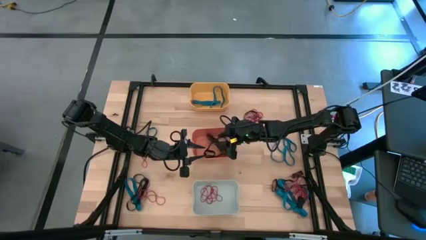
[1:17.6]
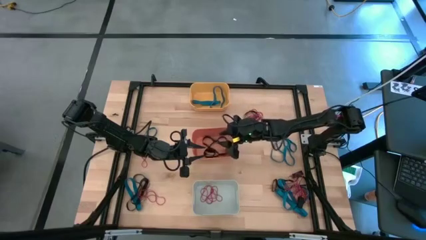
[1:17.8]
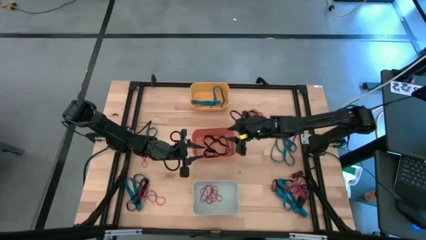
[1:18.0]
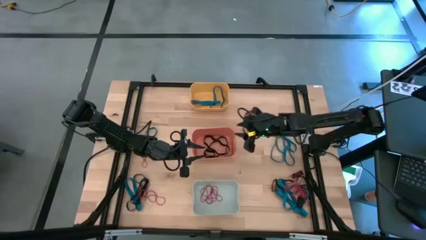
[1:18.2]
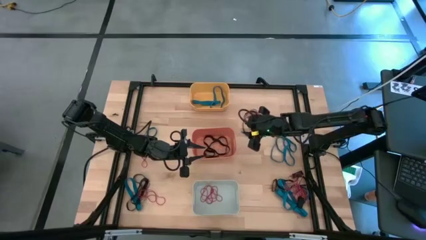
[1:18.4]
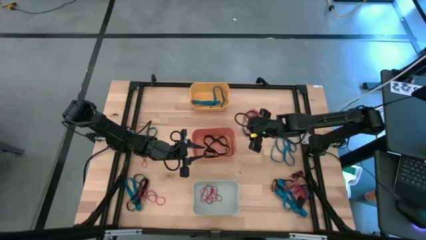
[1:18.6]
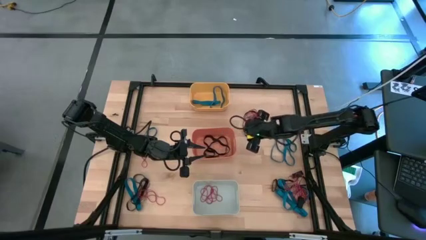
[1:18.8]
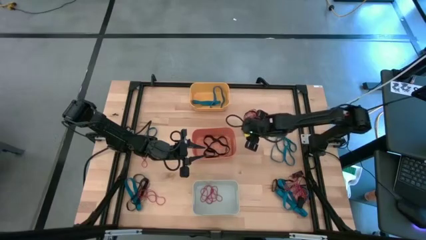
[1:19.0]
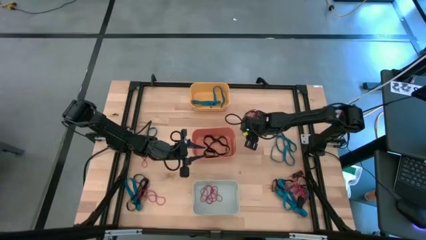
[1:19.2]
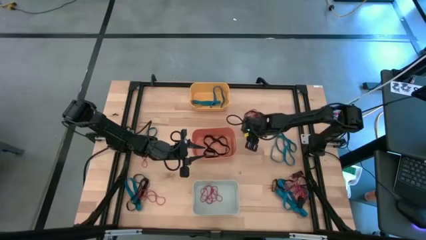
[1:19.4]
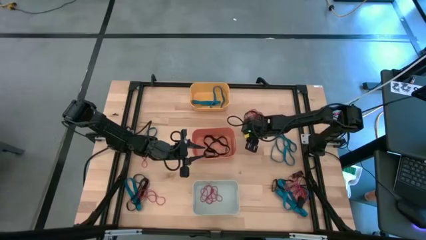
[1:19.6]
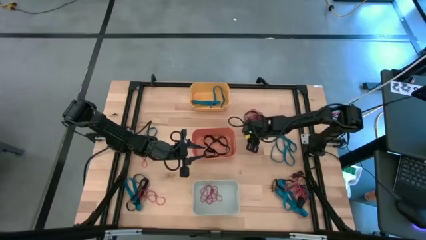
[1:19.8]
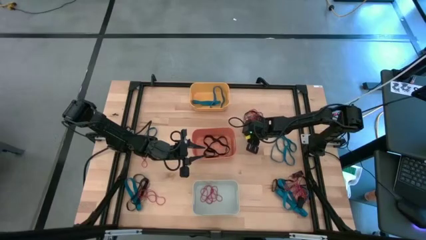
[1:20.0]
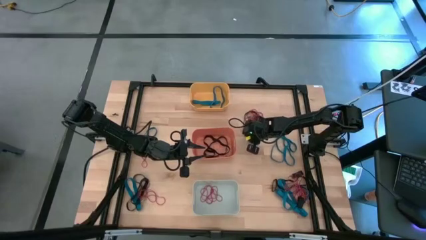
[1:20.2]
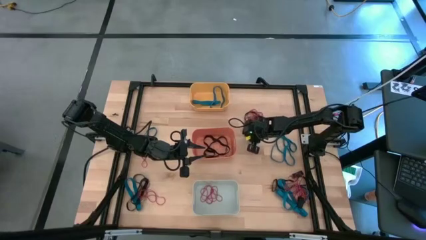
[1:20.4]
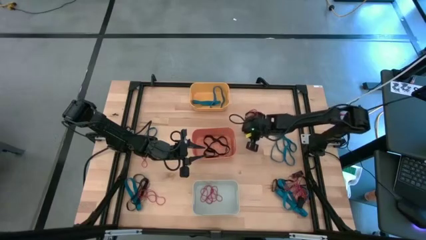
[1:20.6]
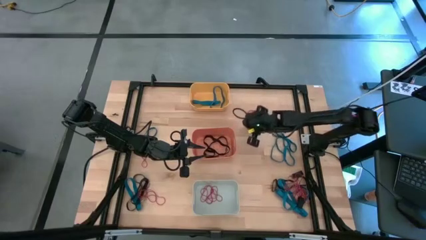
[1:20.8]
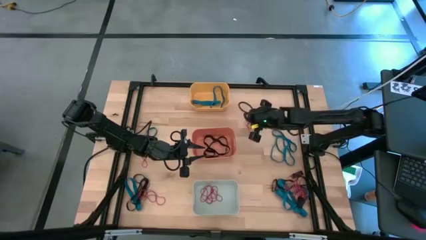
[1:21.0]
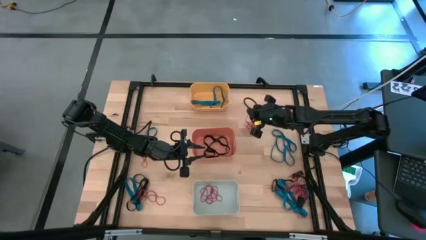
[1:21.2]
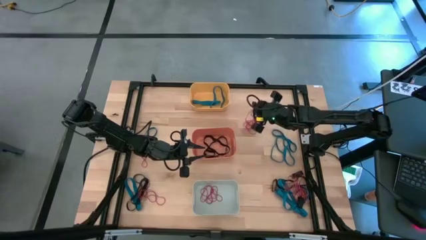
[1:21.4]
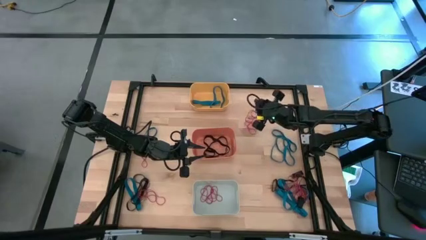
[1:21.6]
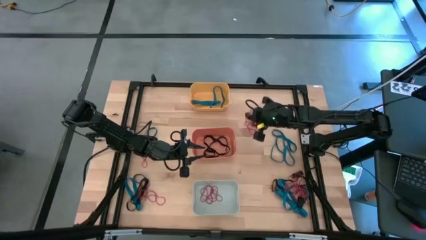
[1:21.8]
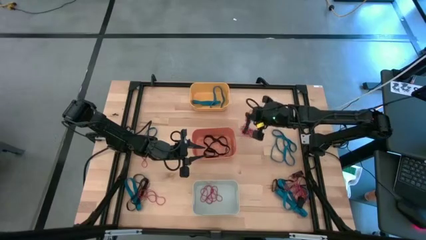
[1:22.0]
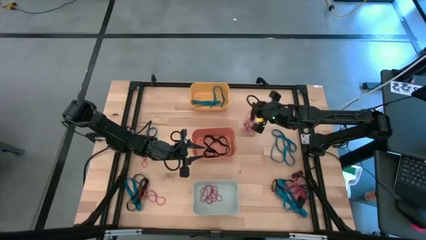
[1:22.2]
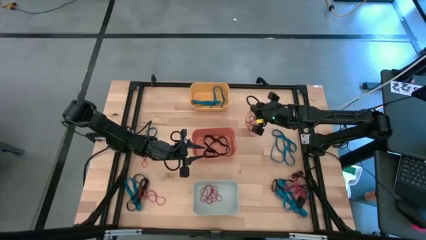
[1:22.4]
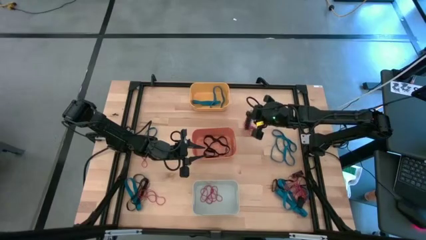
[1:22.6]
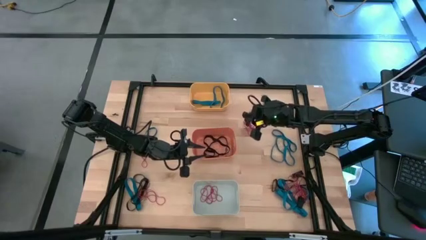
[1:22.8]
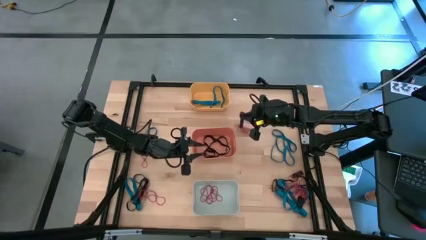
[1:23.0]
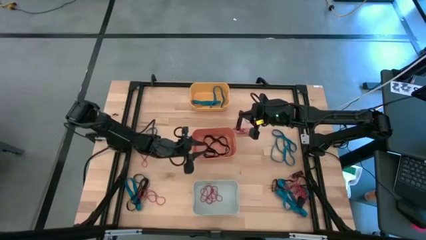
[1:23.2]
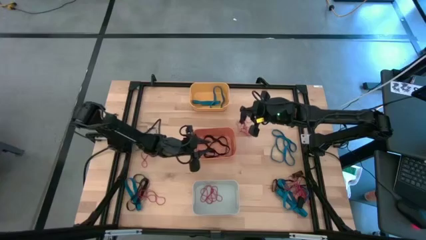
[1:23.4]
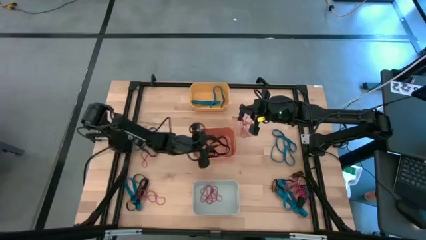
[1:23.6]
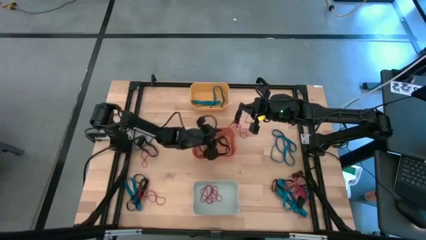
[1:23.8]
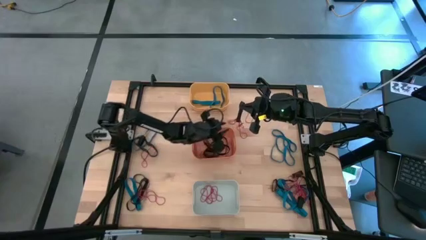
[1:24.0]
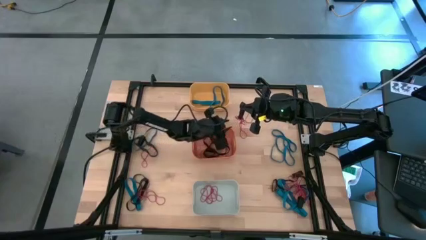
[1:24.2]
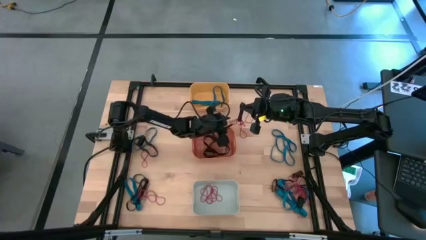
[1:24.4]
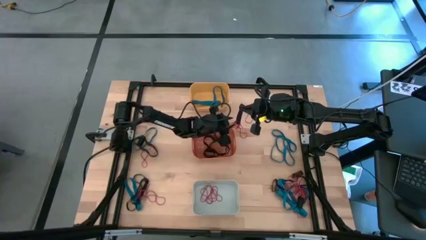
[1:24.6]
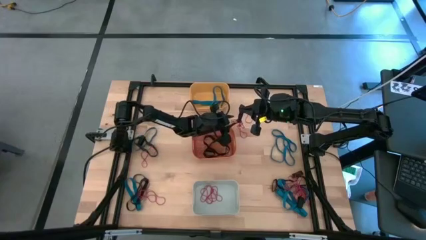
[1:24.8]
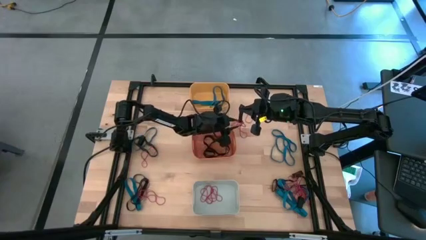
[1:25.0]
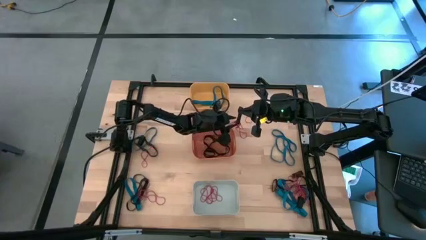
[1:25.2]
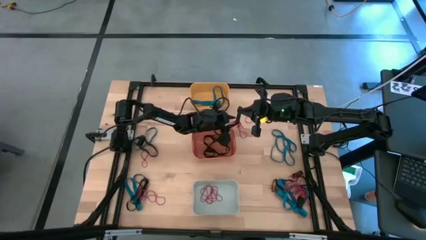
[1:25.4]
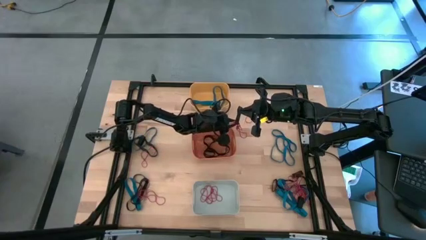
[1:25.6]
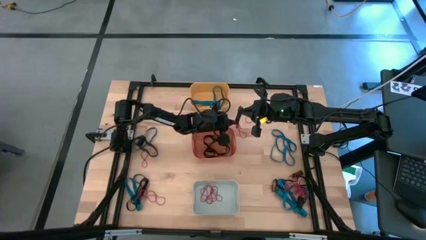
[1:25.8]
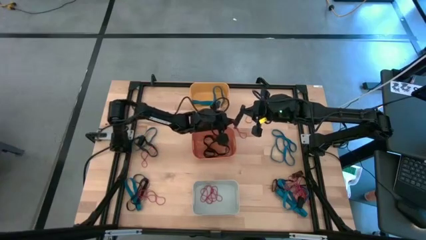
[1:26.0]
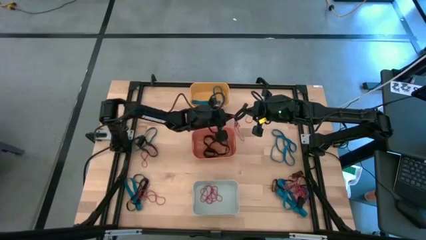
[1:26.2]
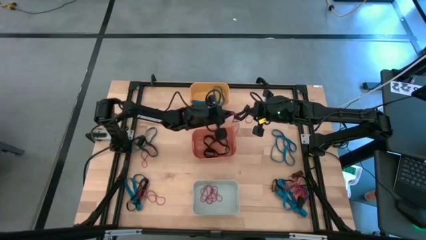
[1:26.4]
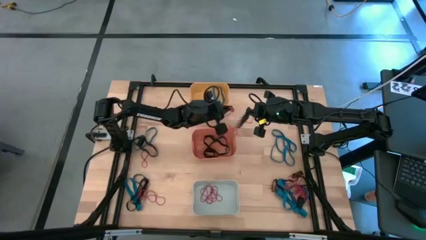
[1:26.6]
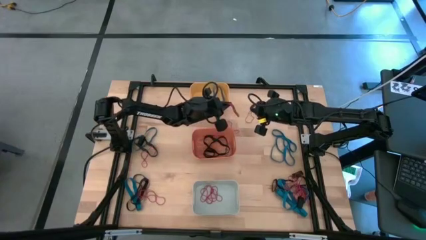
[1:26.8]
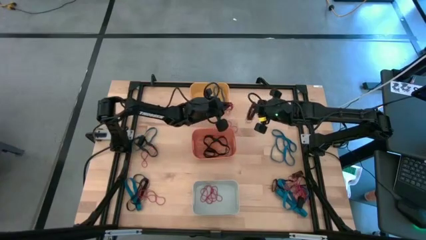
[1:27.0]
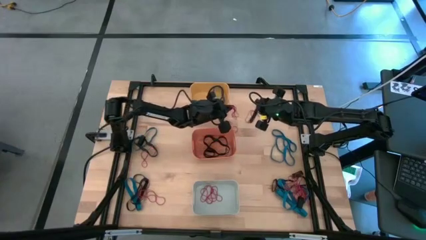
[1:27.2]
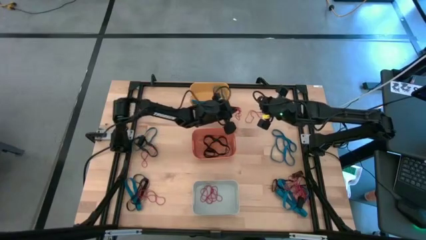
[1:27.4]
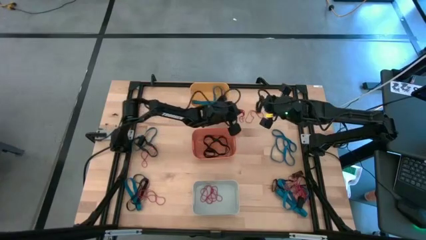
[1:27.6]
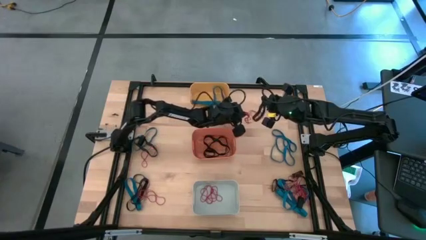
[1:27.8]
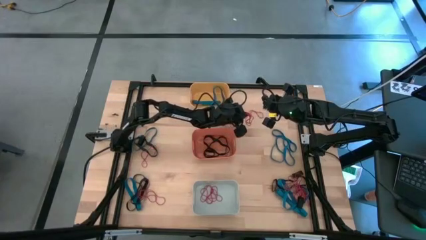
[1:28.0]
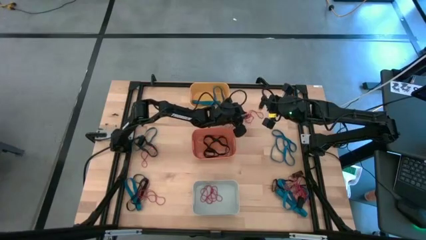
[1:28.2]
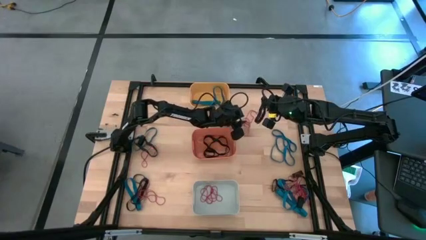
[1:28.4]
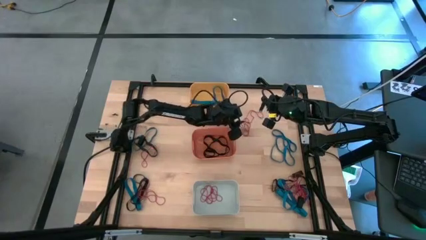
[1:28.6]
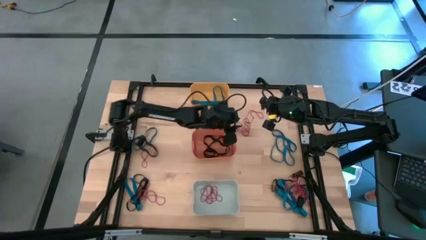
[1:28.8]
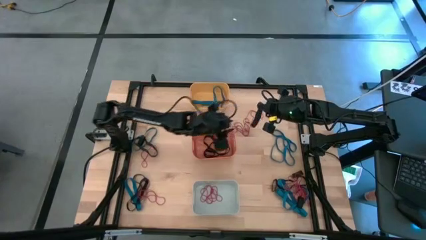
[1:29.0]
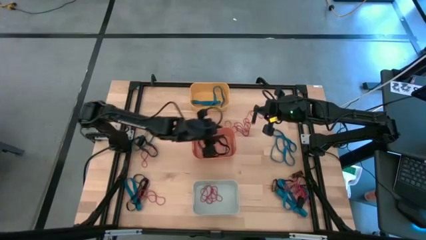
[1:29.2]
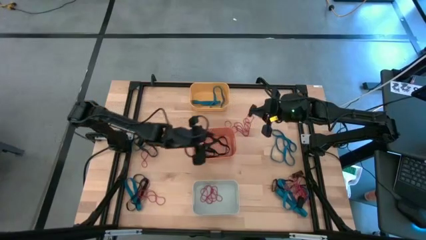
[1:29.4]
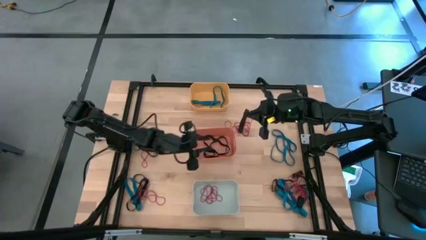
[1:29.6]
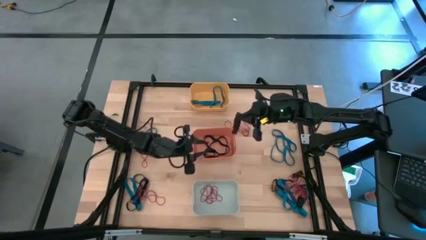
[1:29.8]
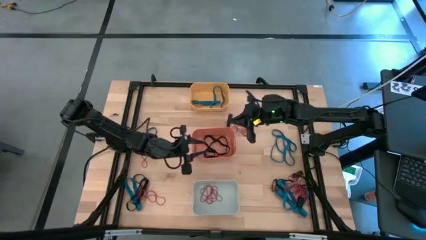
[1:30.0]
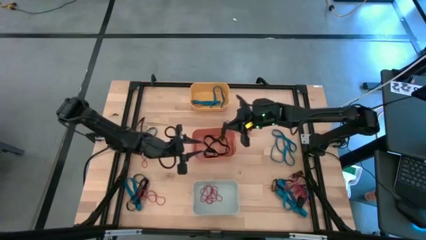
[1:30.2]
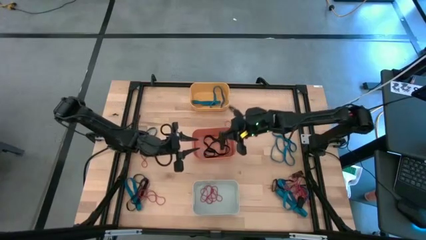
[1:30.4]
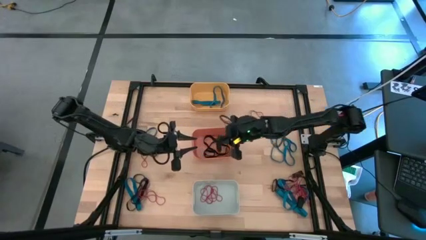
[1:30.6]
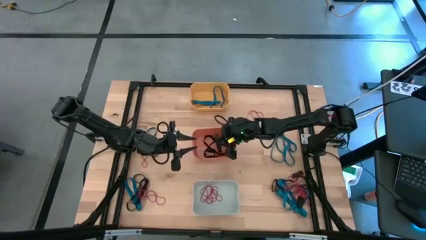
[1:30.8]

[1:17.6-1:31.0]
Task: Sort rubber bands into baskets
Put the black rubber band in the orange bin
